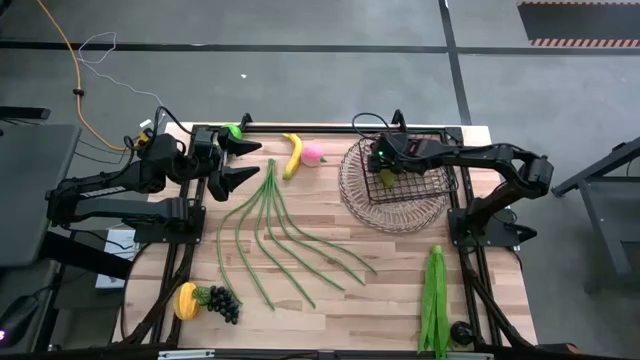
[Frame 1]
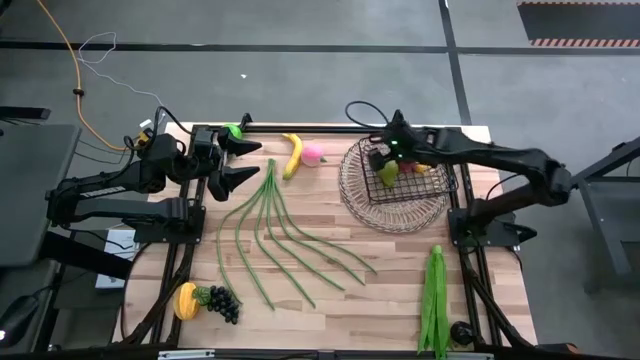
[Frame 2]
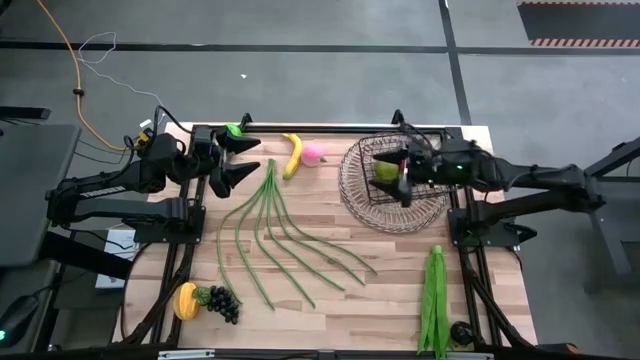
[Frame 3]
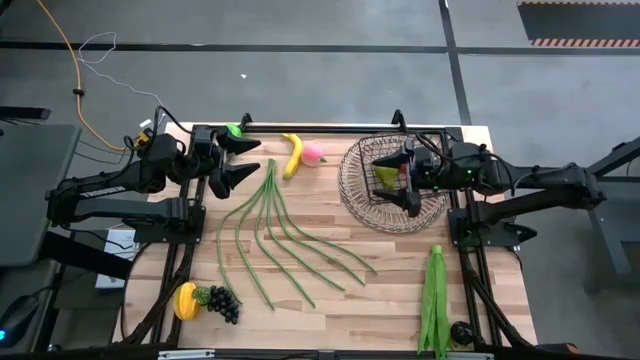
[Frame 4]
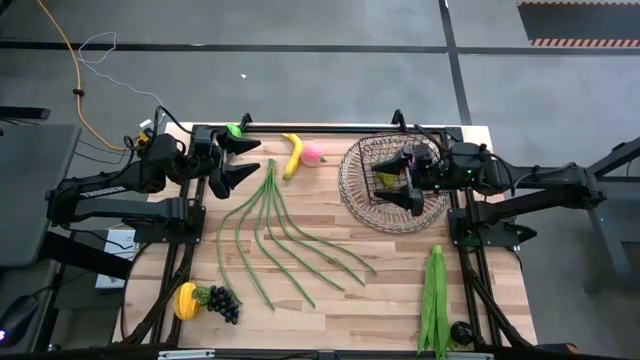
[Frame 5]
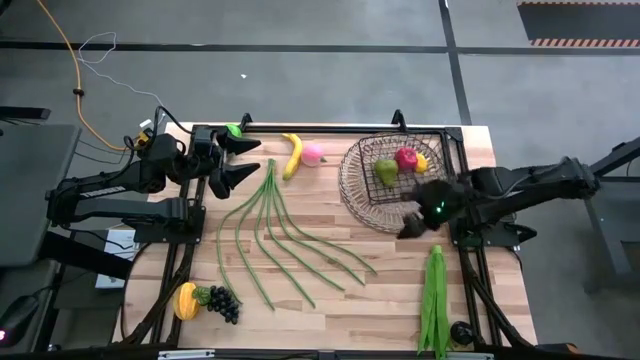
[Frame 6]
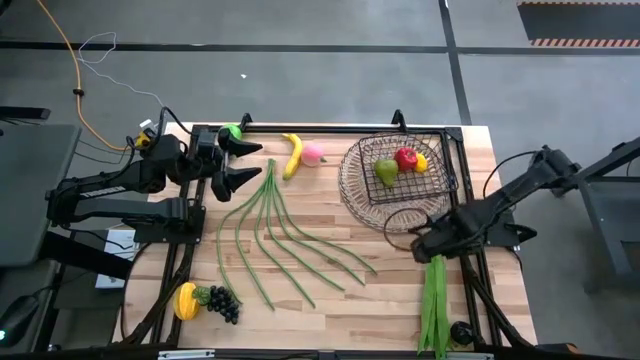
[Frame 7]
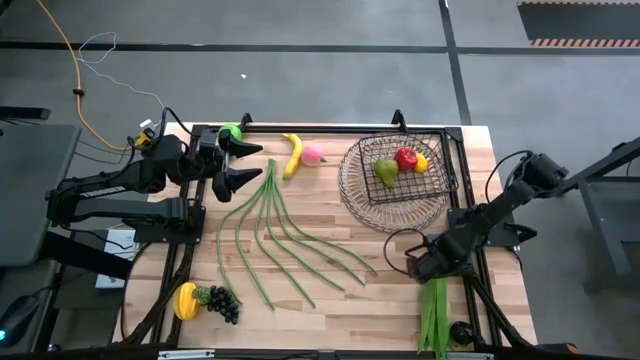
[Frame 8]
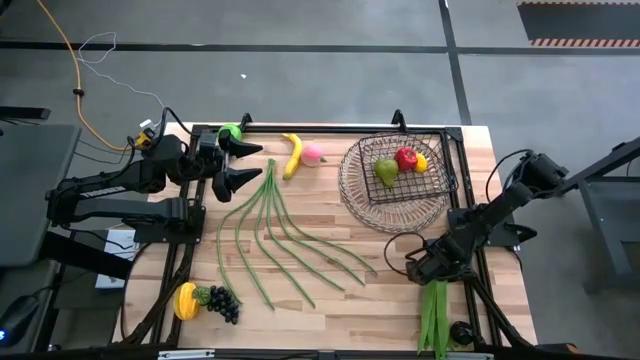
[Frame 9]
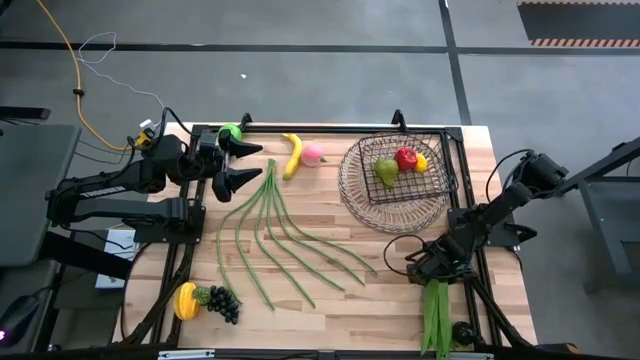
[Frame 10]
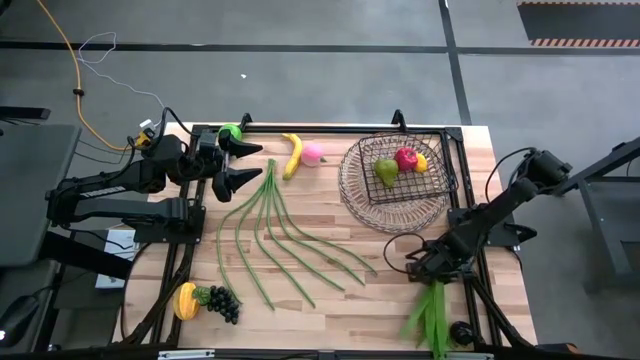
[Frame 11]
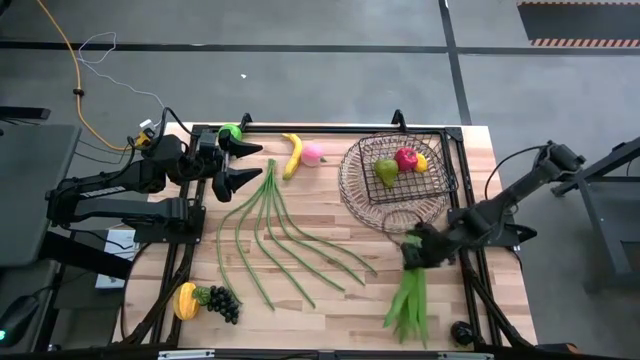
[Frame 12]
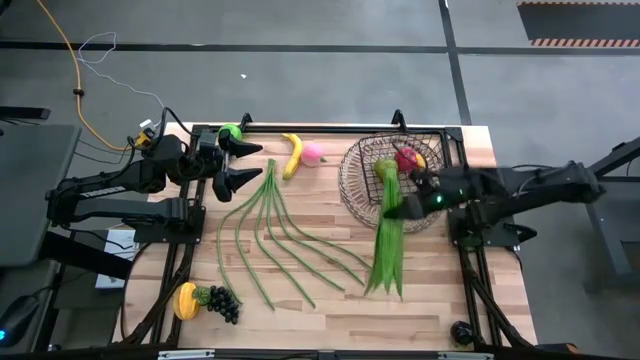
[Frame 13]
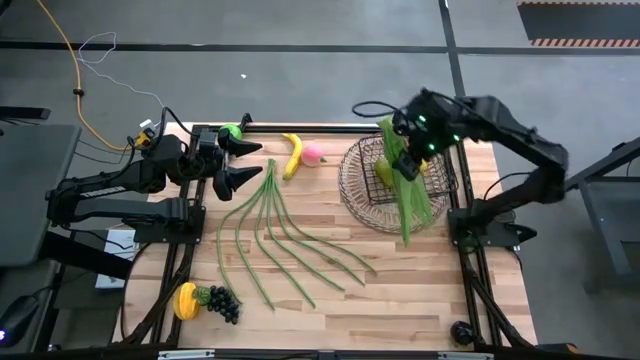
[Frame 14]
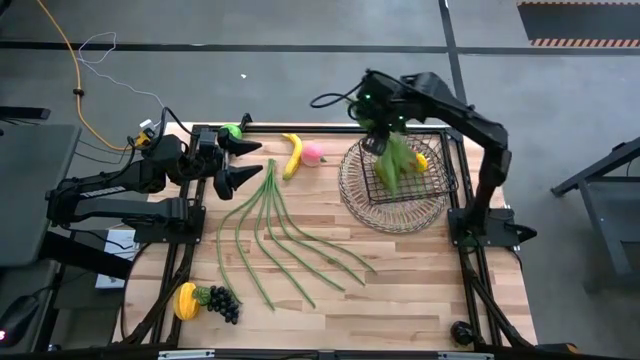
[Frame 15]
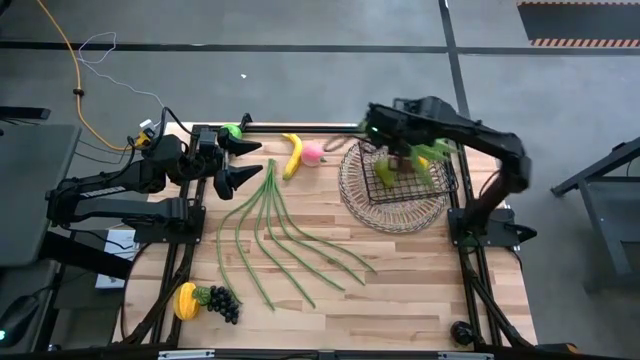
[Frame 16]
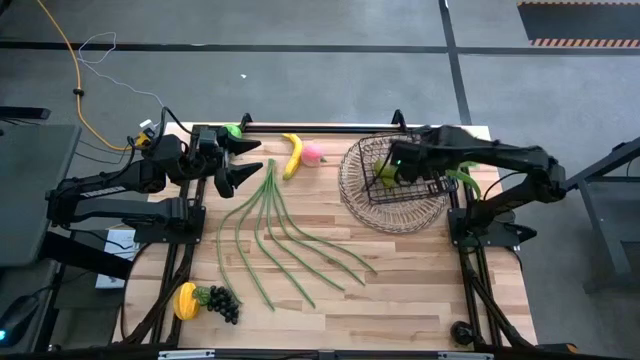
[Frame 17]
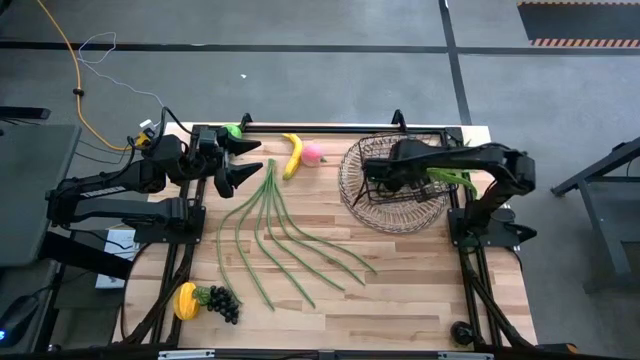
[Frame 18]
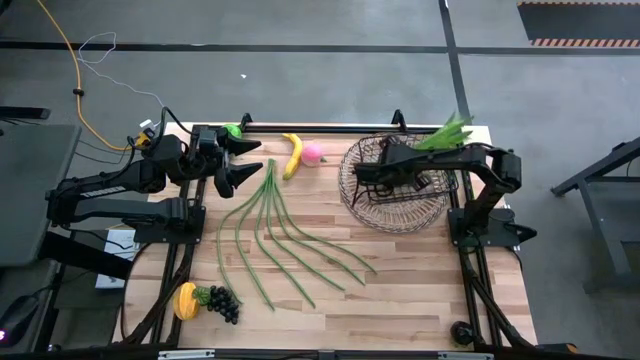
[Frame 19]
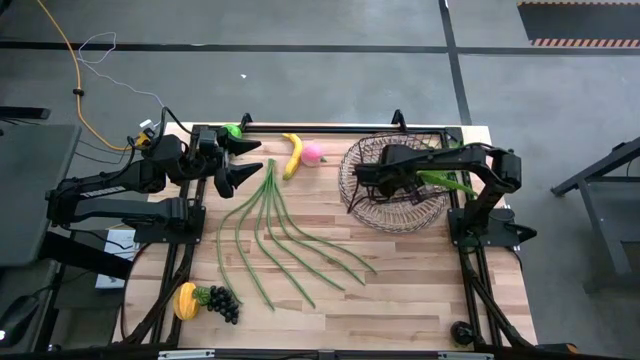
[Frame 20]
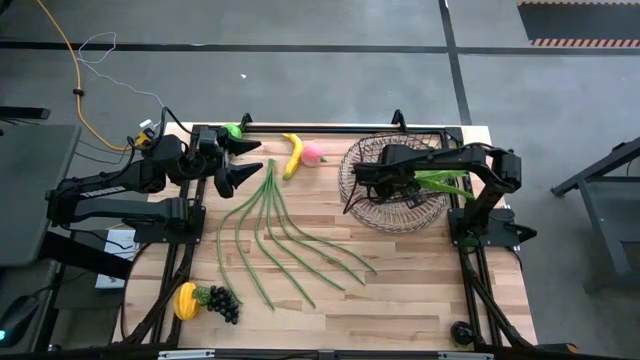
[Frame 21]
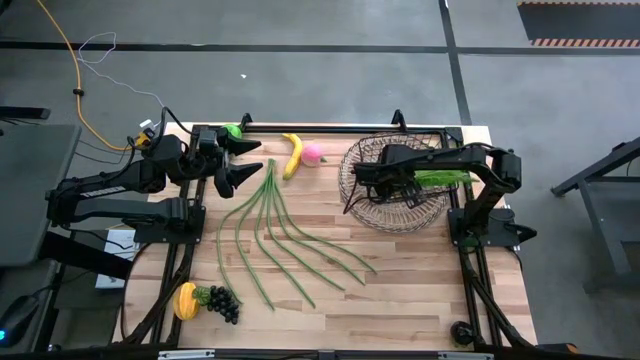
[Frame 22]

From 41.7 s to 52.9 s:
Task: Build produce basket
Put the green leaf lettuce into the wire basket

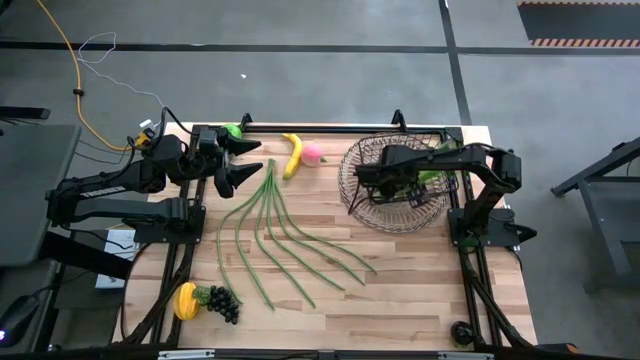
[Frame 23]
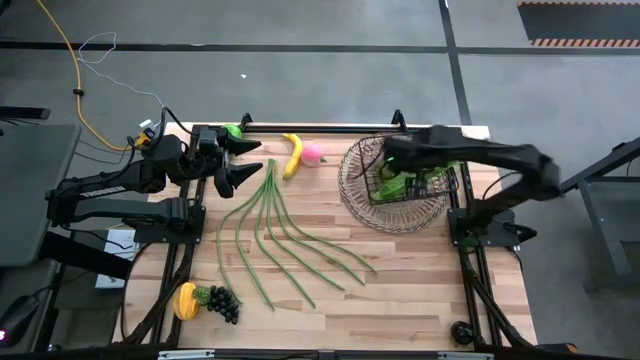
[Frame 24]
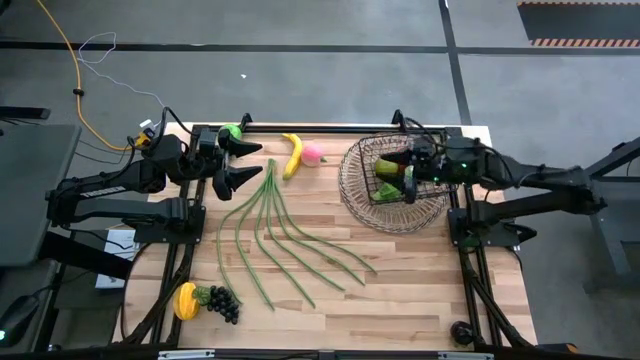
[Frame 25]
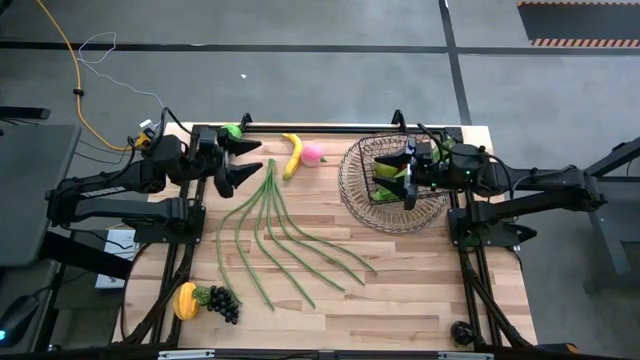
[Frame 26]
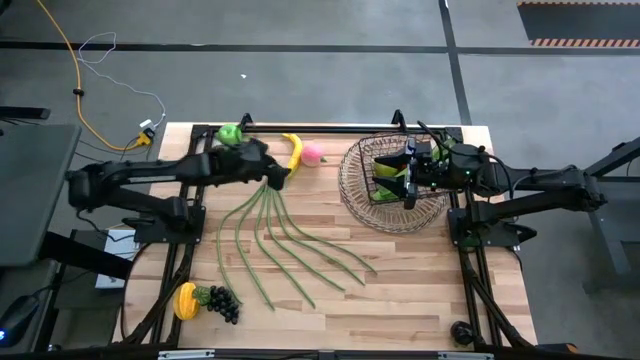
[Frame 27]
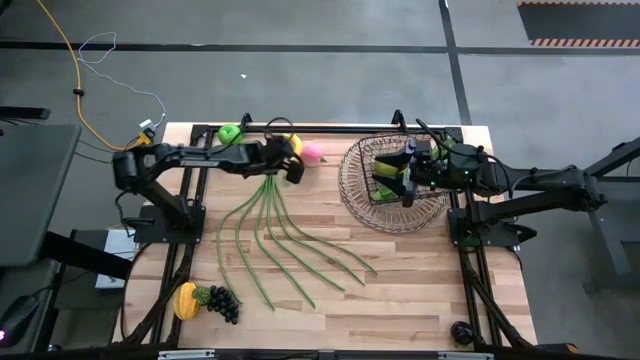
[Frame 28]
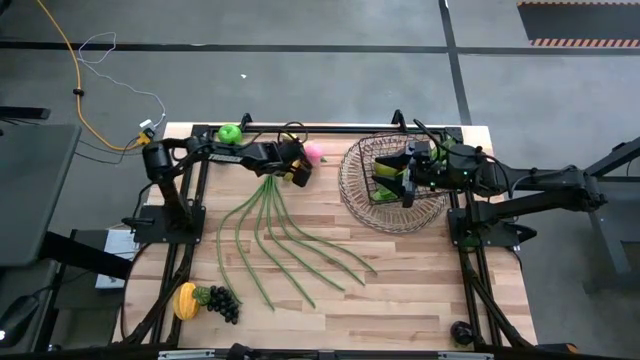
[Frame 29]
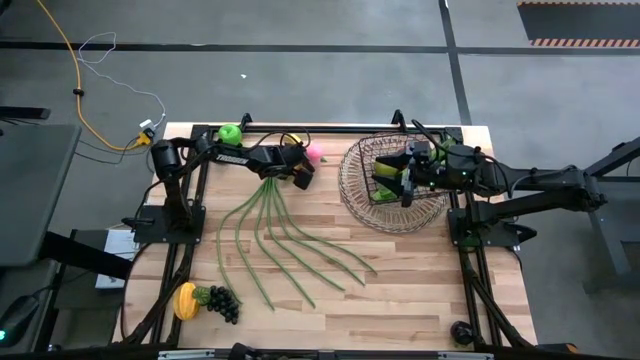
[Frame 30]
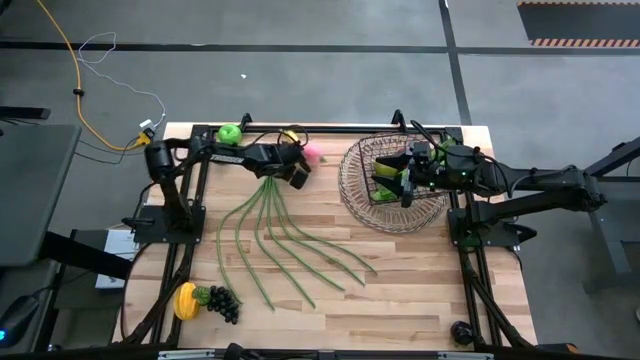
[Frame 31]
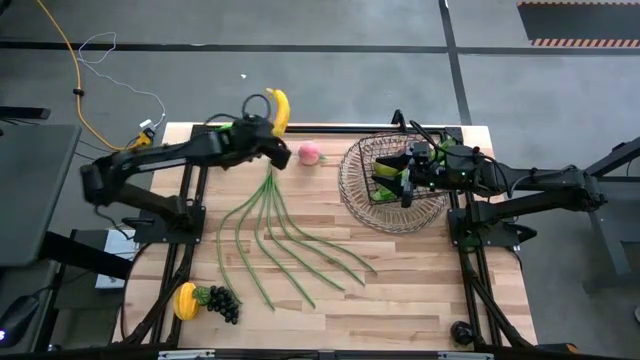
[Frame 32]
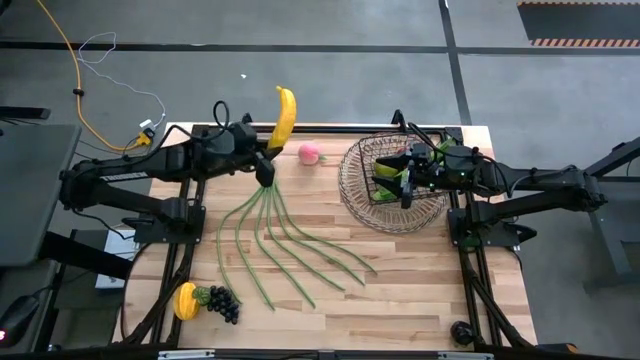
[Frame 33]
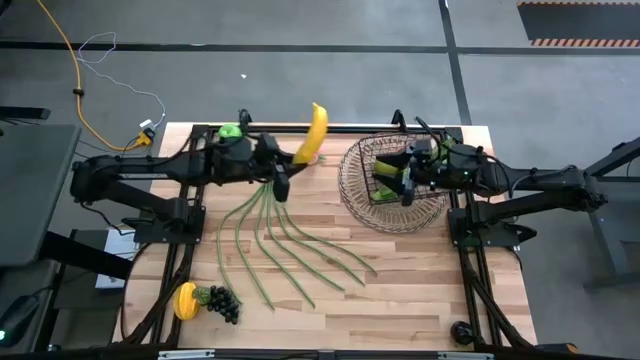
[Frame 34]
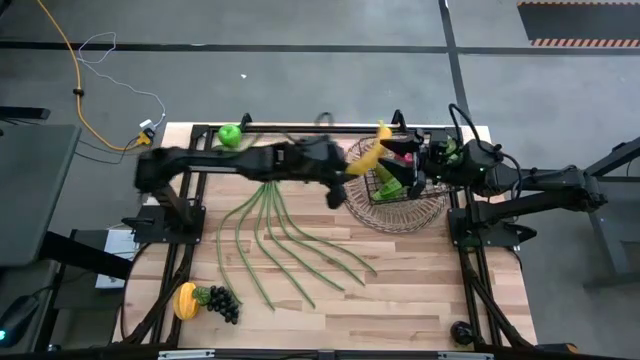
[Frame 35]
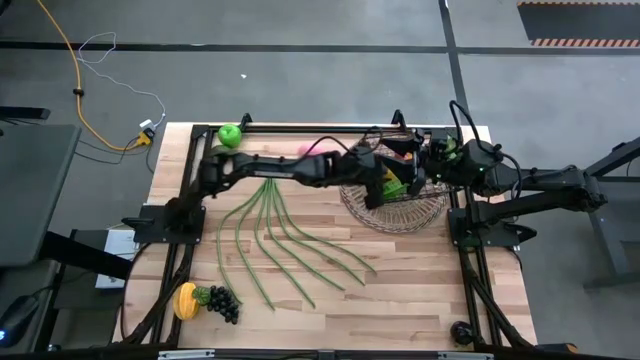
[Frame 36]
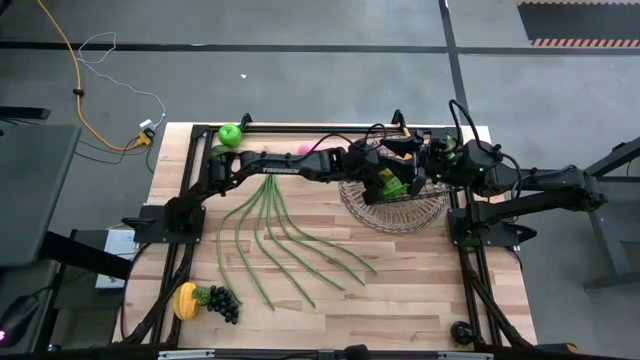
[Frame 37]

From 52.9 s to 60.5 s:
Put the yellow banana into the wire basket

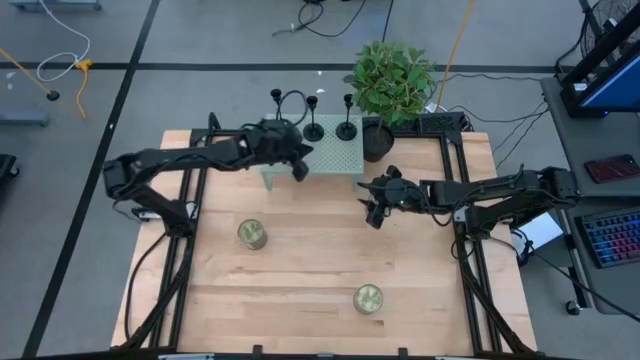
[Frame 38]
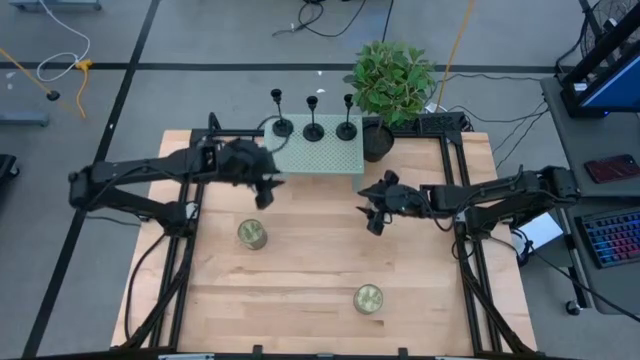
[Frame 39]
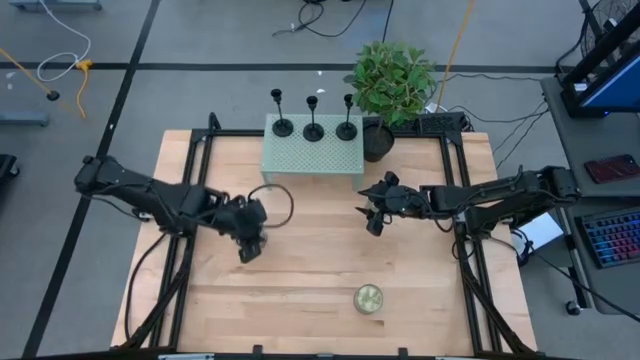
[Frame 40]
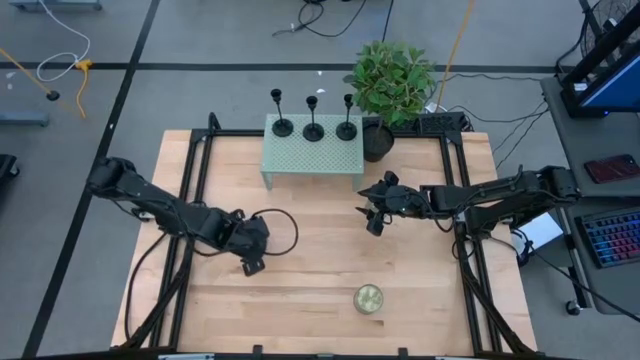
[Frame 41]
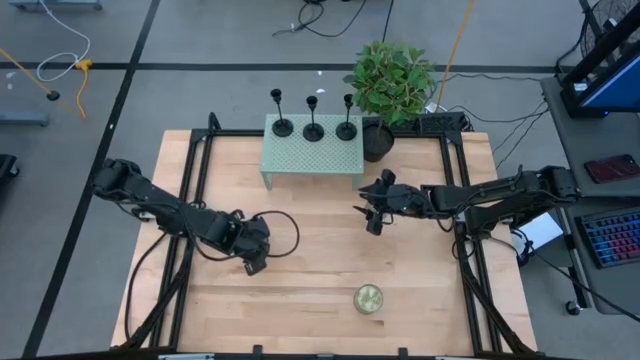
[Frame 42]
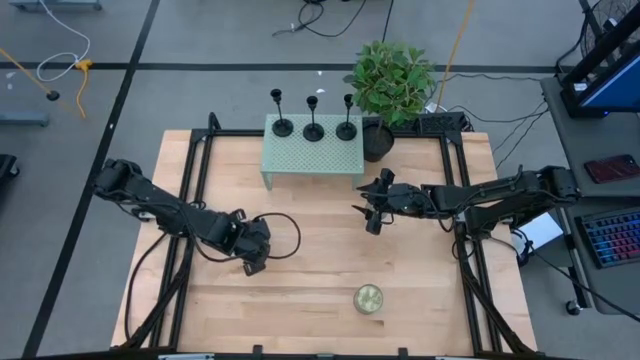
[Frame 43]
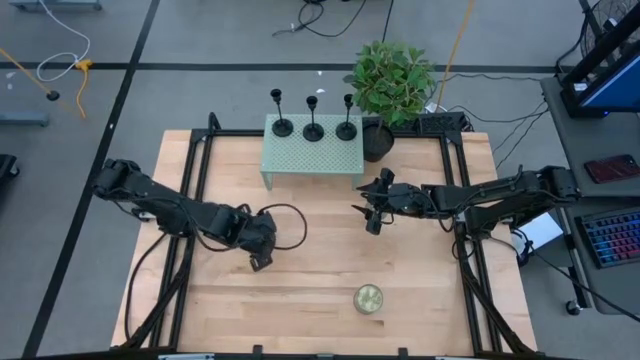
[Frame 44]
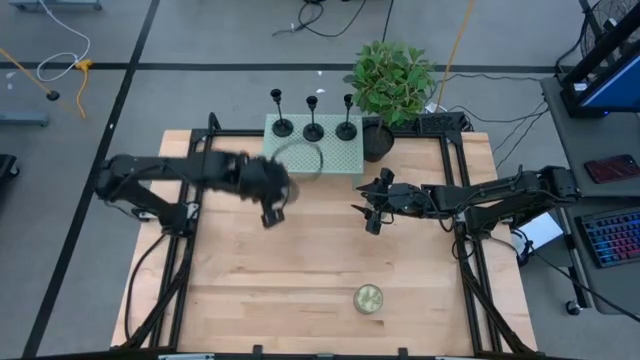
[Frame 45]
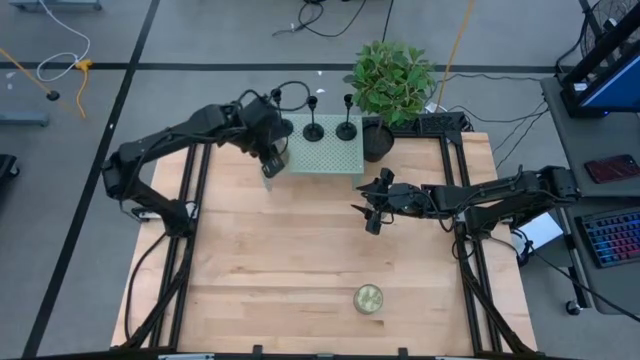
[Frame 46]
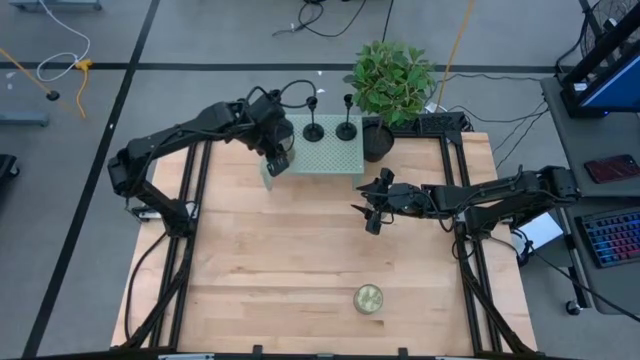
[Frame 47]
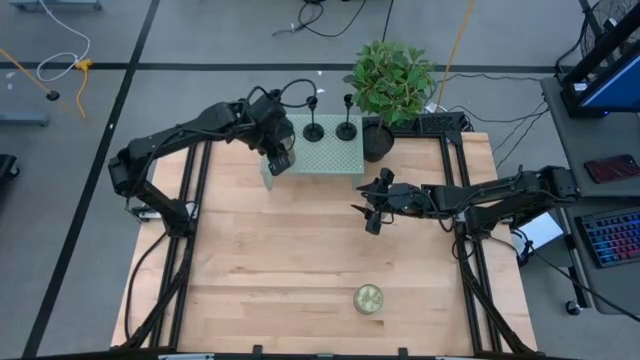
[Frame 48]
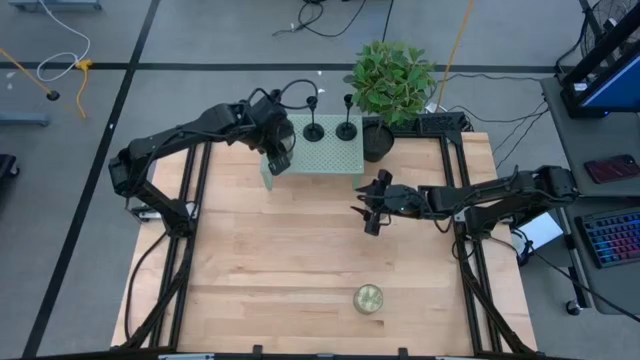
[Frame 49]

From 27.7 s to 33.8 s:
Task: Pick & Place candle stick holders
Put the left scented candle on the shelf aligned with the left candle holder
